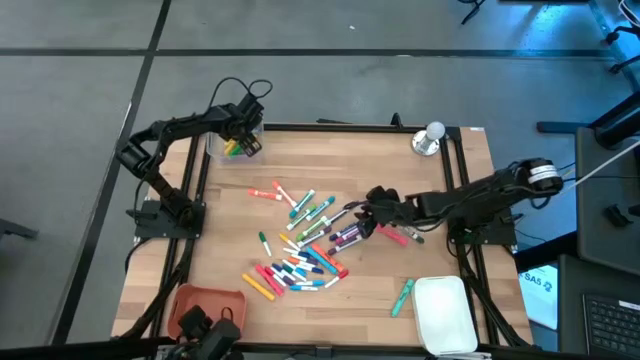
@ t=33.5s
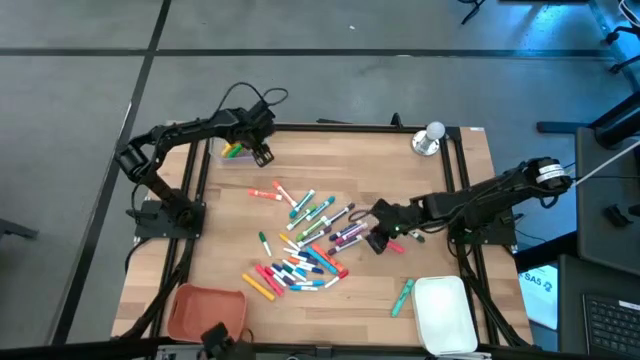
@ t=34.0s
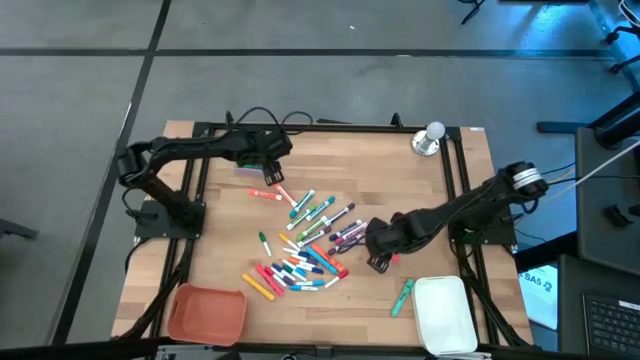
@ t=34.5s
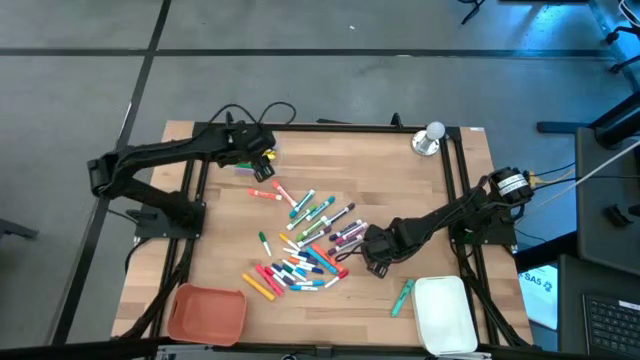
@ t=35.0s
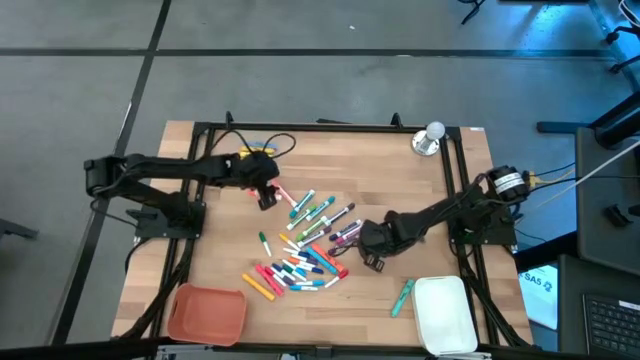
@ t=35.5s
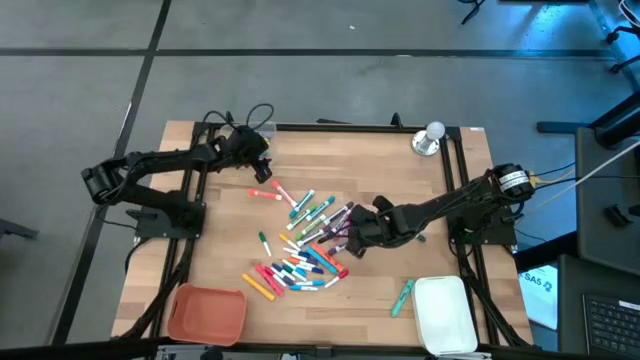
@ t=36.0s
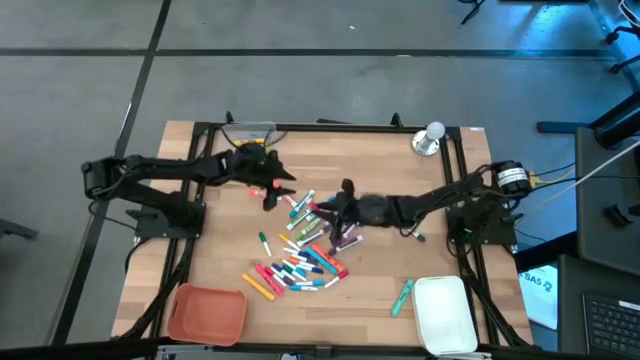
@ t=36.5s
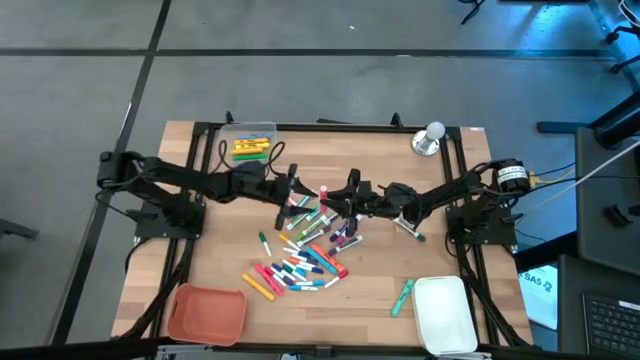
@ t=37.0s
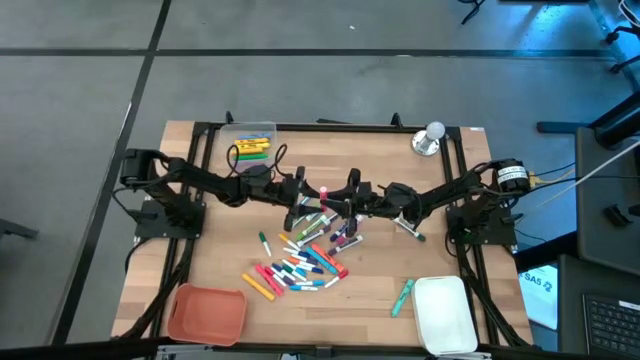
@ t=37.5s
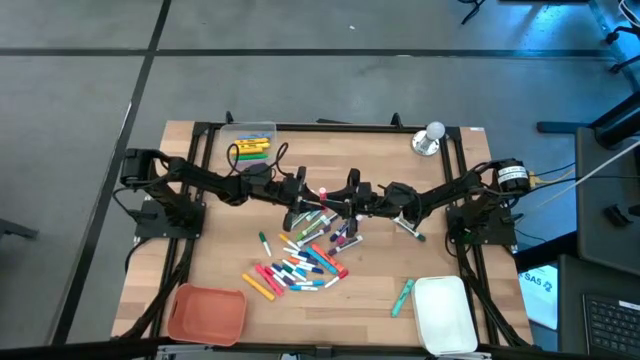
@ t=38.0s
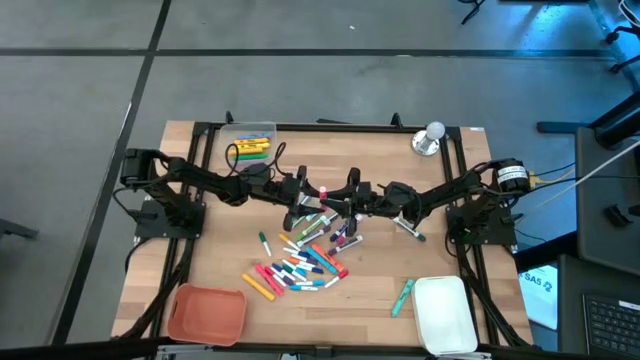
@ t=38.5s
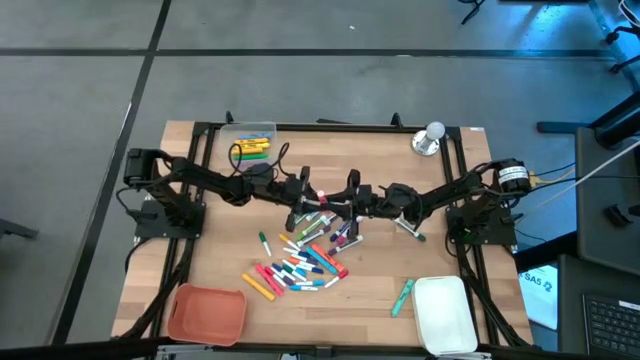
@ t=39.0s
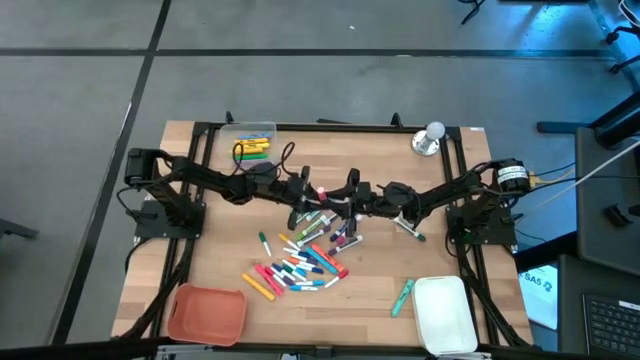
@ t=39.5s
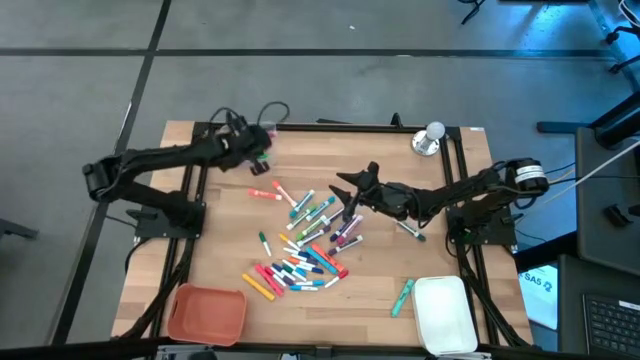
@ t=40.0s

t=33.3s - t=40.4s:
Task: Pick & Place Markers
Put the pink pen into the transparent bin

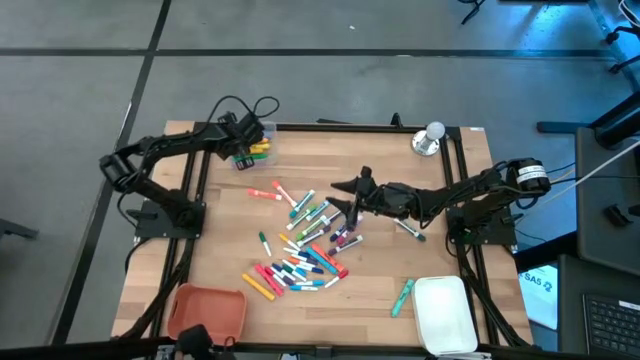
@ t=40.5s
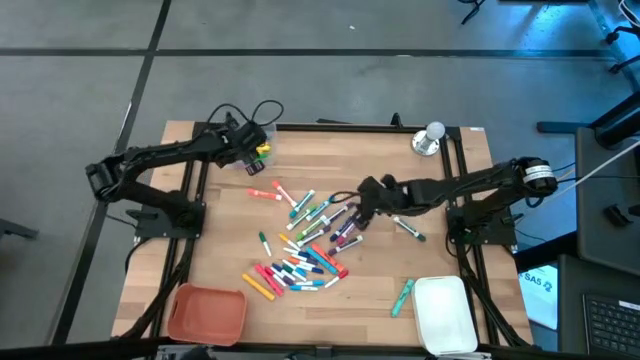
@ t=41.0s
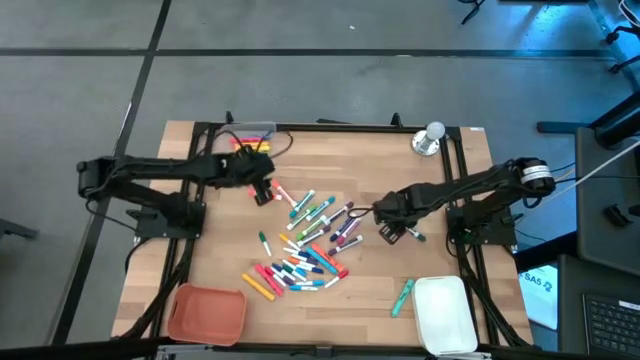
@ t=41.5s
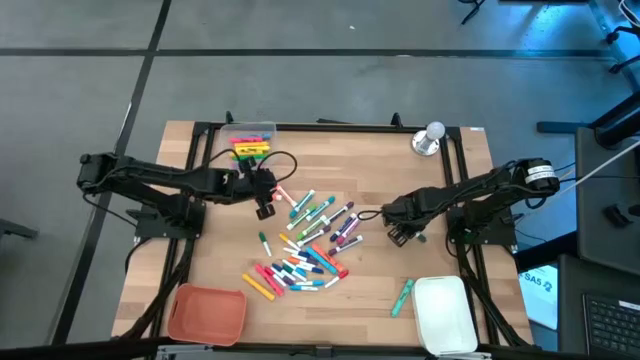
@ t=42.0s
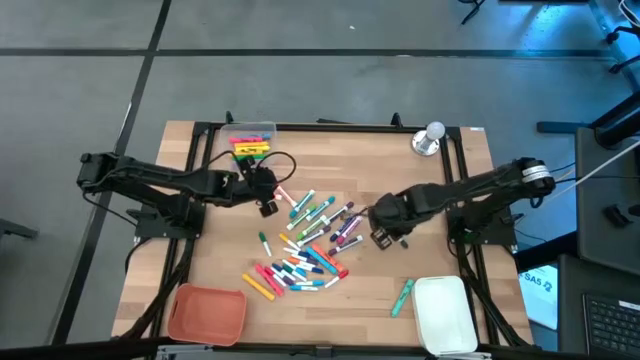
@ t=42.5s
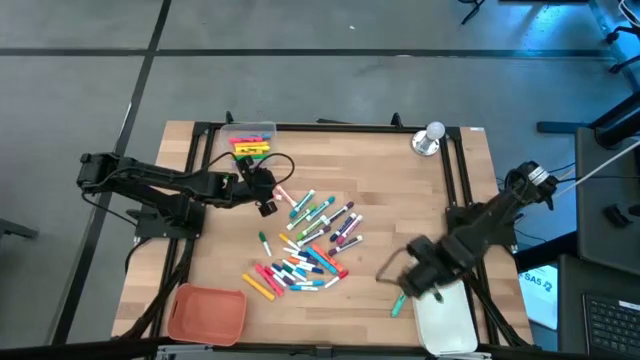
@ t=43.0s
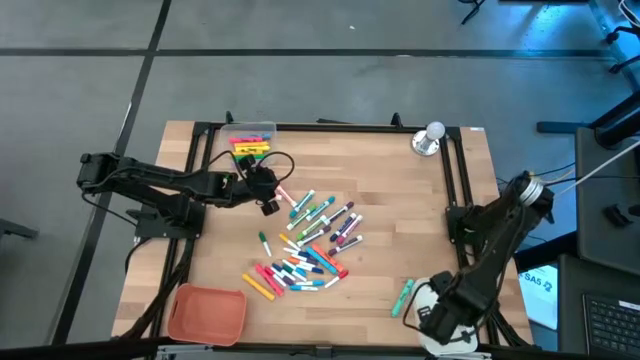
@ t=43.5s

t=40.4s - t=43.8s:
Put the green pen into the white bin

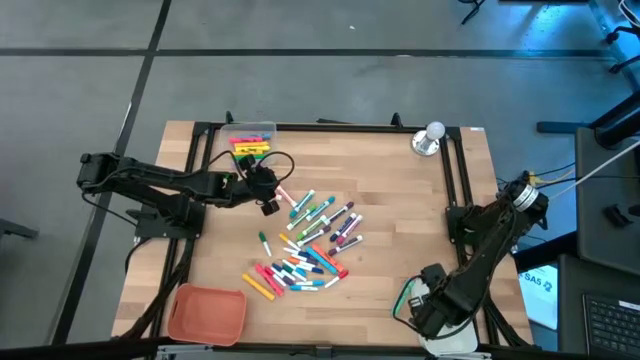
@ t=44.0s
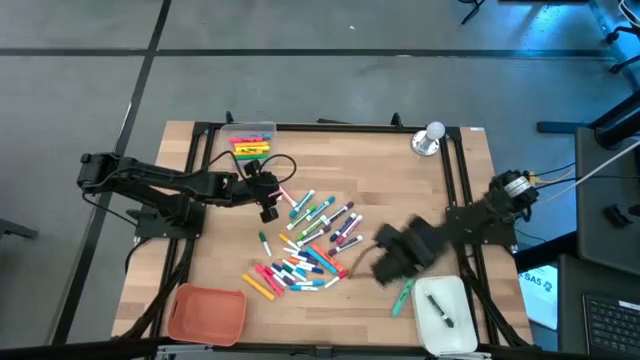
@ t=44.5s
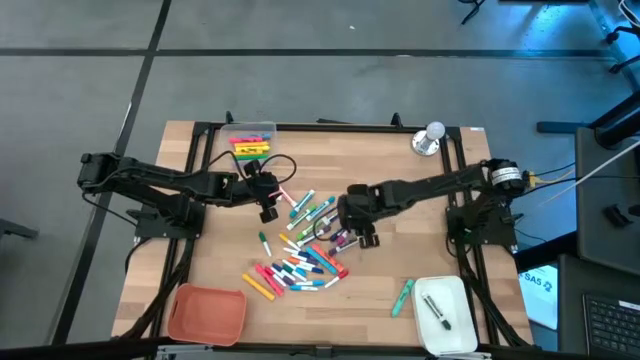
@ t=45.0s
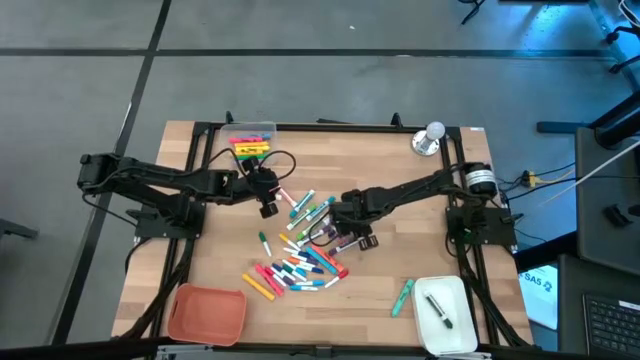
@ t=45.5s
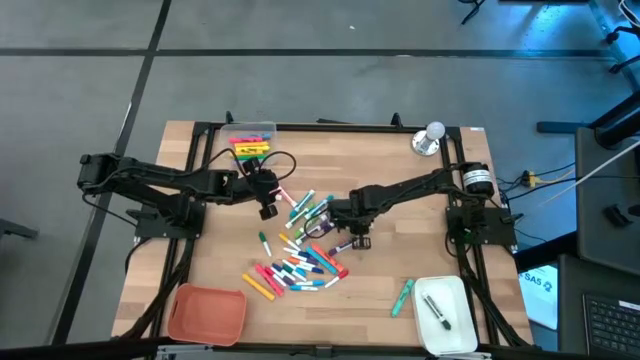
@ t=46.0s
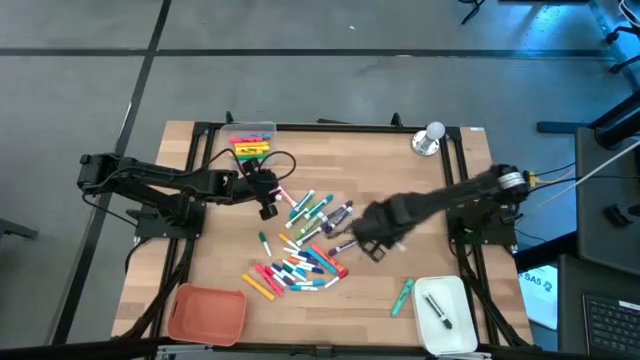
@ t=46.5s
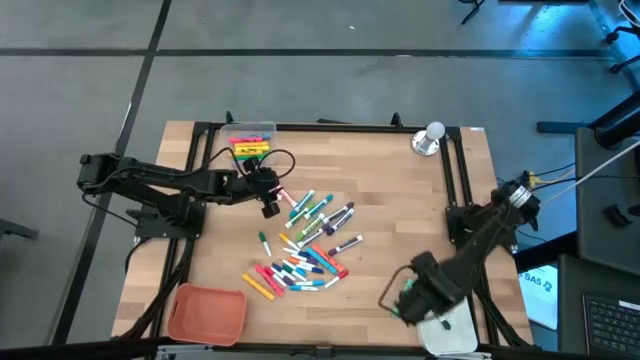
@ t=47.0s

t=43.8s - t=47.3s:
Put the red pen into the transparent bin

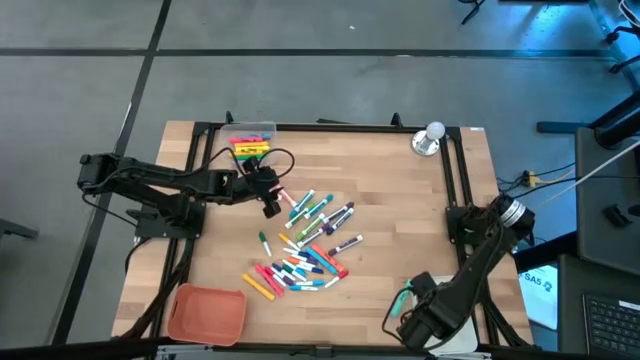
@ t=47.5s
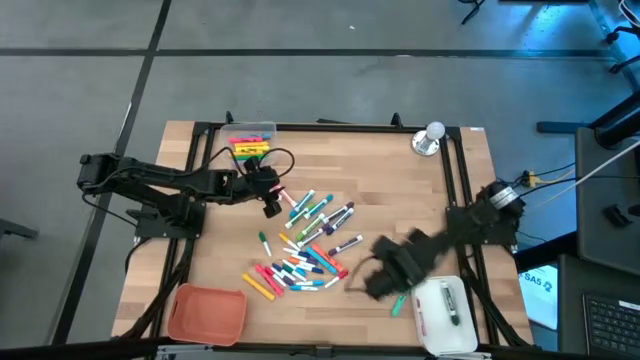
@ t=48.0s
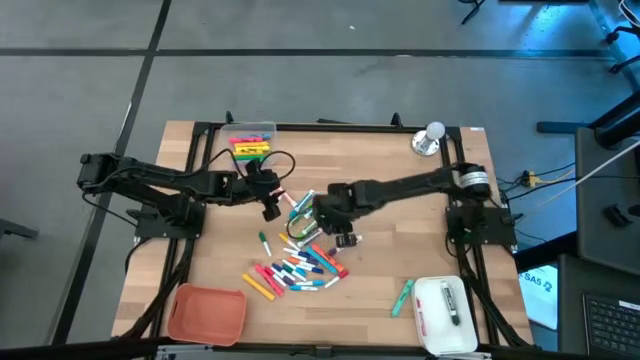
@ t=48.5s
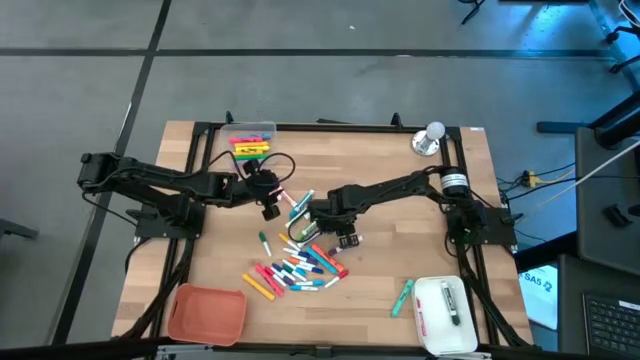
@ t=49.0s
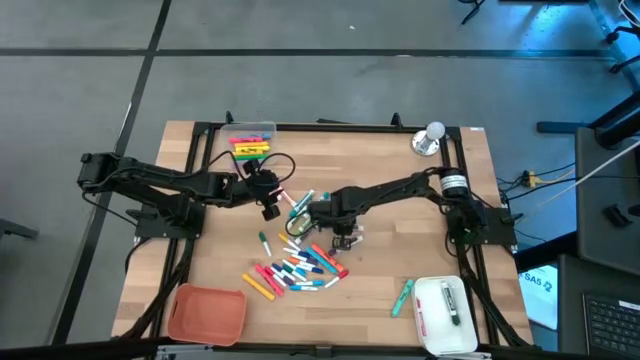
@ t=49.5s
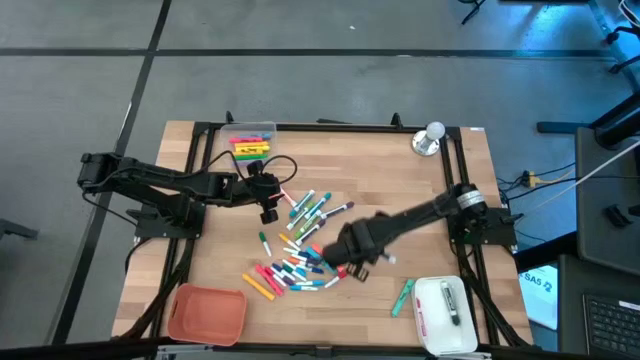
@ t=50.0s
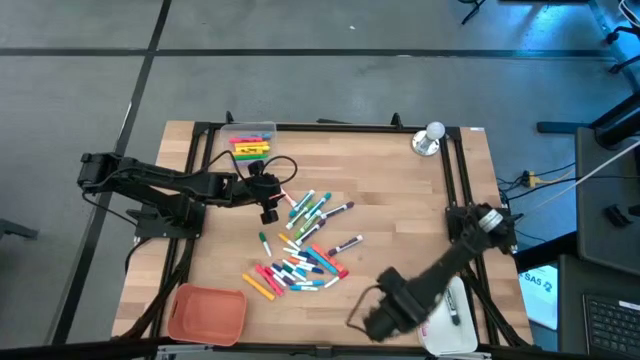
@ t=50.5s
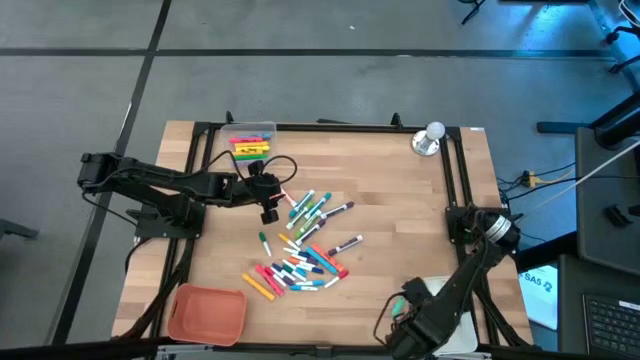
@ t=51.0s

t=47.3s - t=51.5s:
Put the blue pen into the white bin

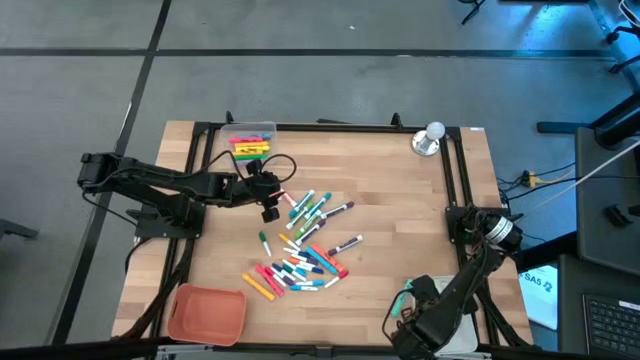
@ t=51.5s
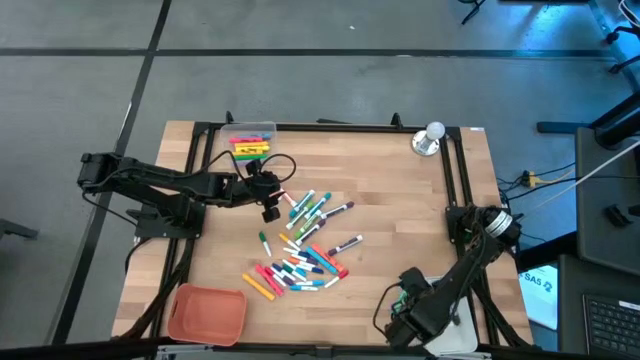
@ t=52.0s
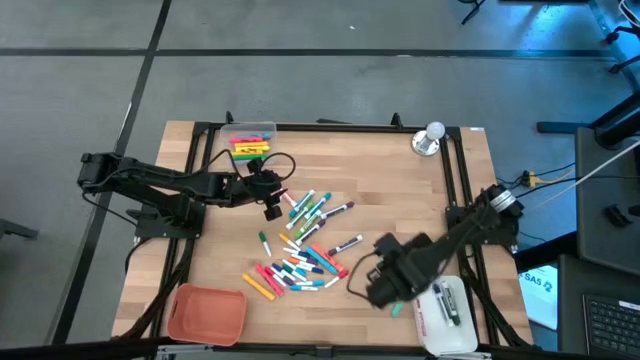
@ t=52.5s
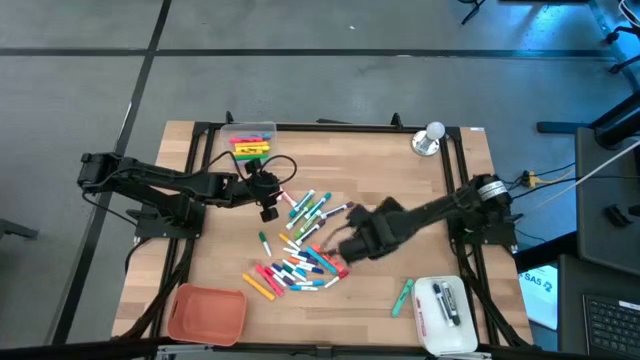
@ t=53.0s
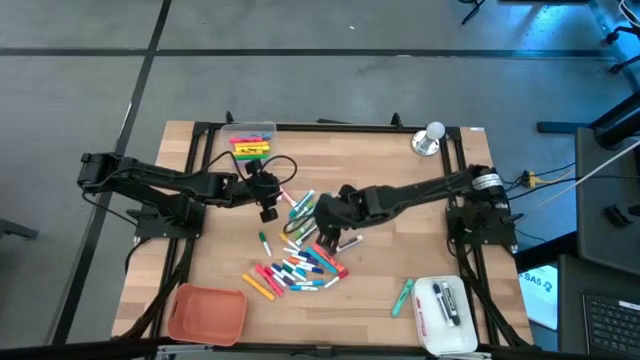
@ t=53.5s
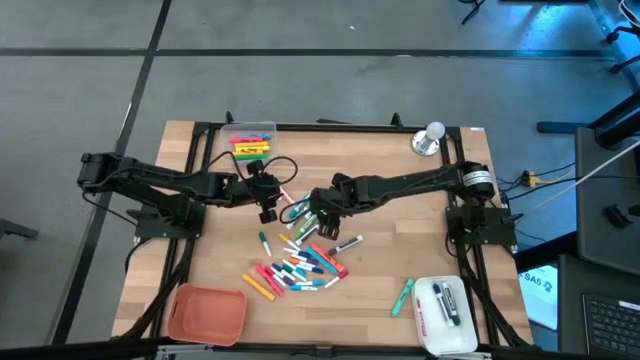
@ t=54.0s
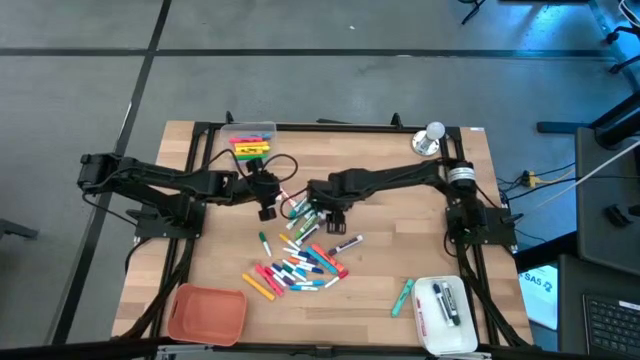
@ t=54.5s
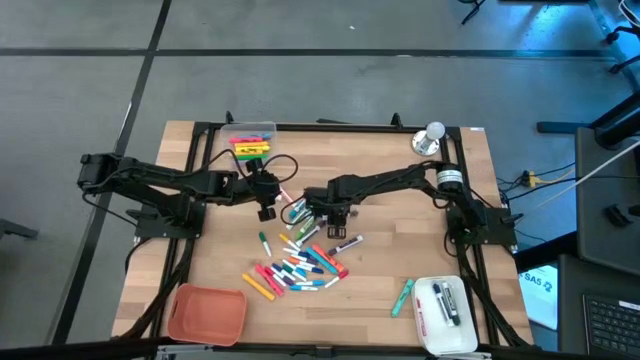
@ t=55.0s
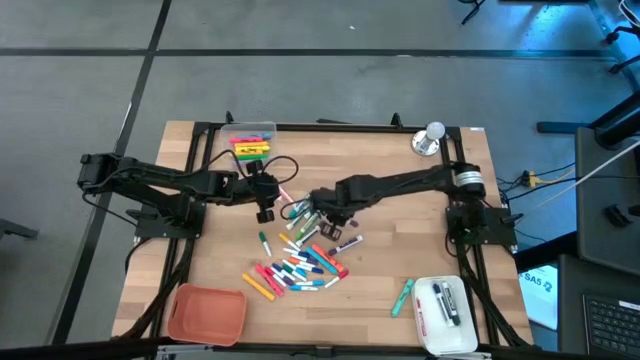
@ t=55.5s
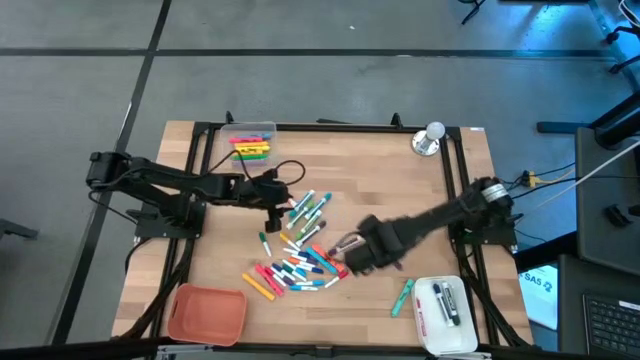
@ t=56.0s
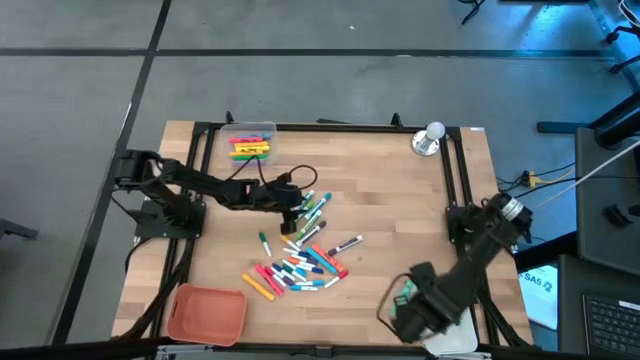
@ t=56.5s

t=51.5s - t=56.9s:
Put the middle center violet pen into the white bin
